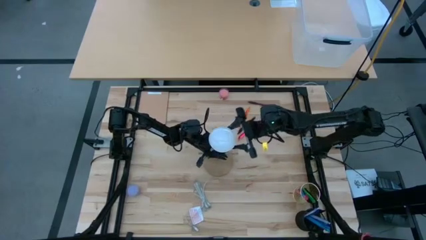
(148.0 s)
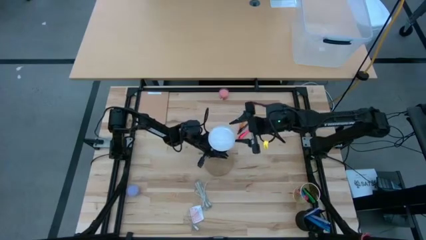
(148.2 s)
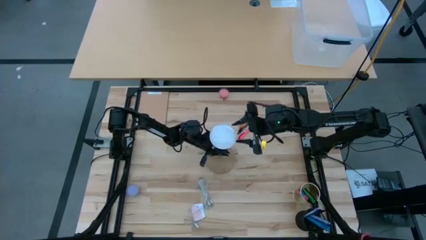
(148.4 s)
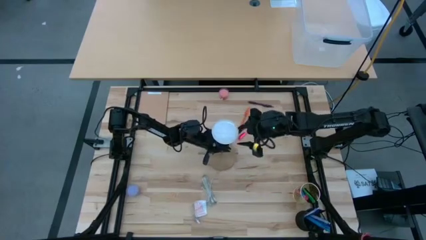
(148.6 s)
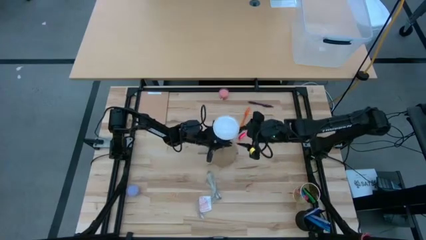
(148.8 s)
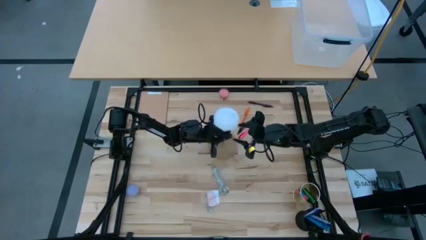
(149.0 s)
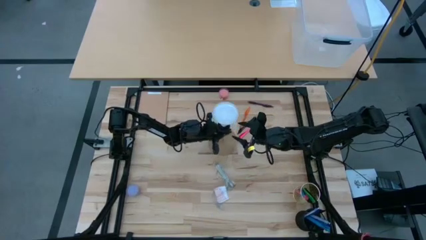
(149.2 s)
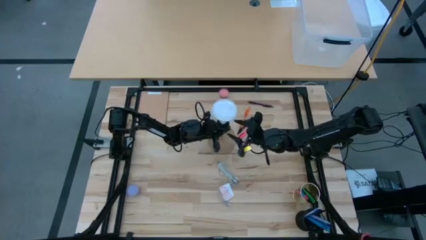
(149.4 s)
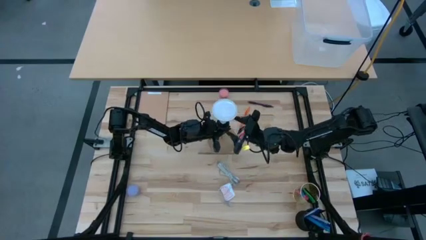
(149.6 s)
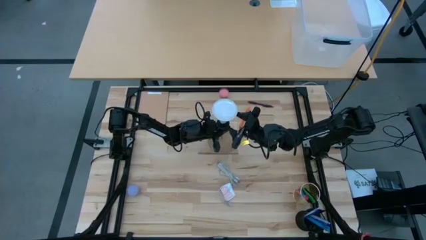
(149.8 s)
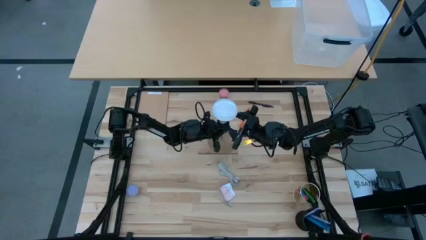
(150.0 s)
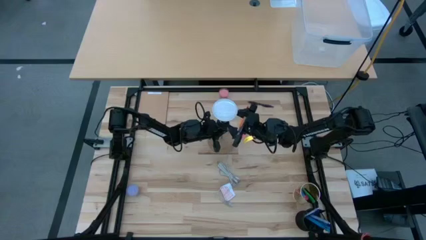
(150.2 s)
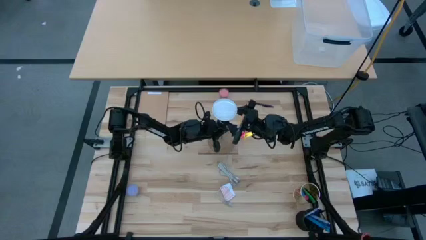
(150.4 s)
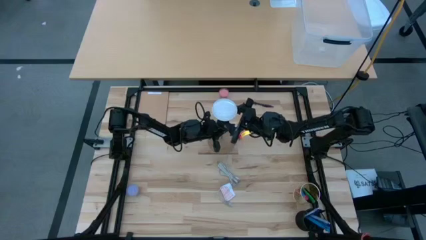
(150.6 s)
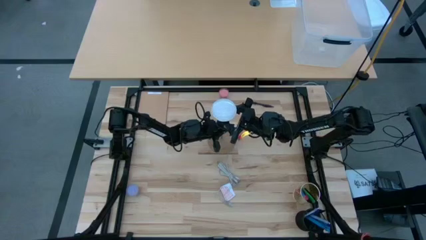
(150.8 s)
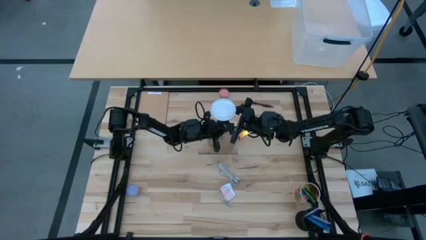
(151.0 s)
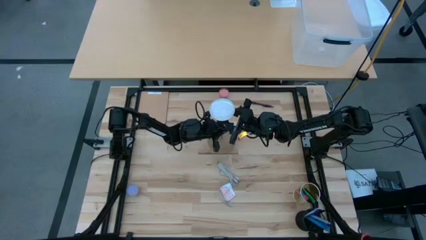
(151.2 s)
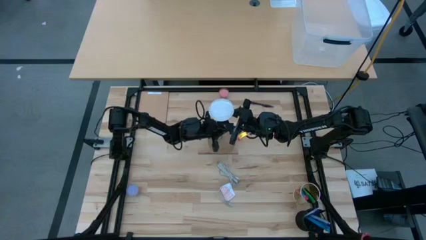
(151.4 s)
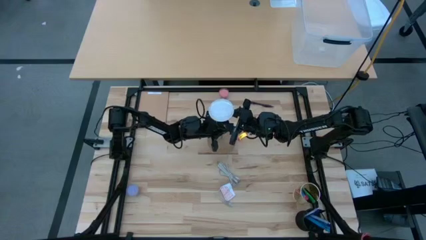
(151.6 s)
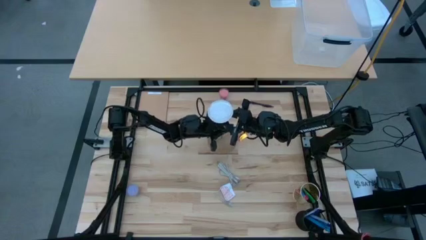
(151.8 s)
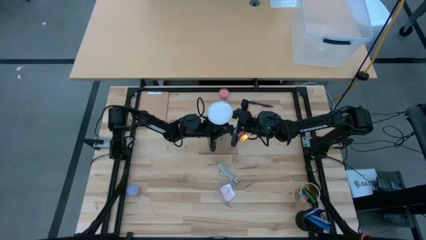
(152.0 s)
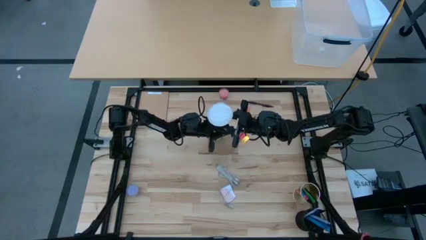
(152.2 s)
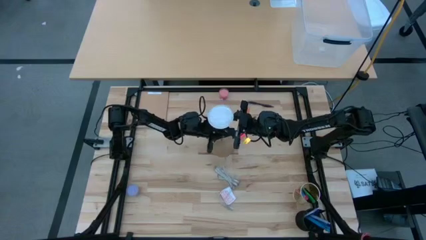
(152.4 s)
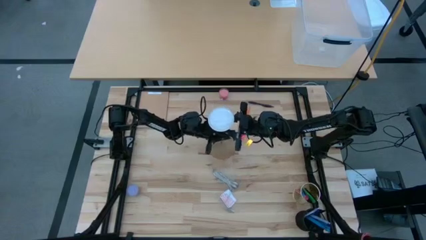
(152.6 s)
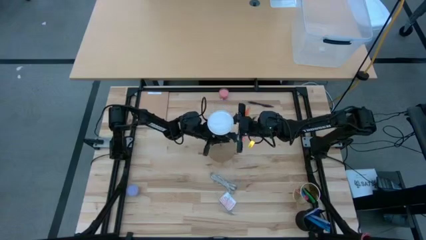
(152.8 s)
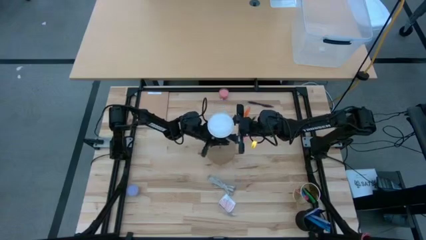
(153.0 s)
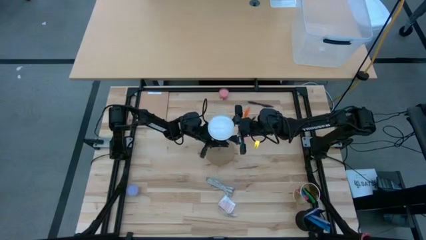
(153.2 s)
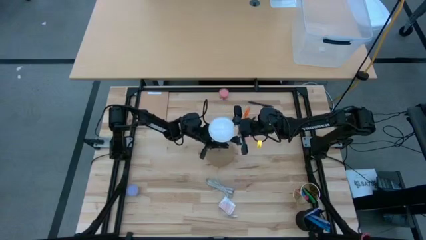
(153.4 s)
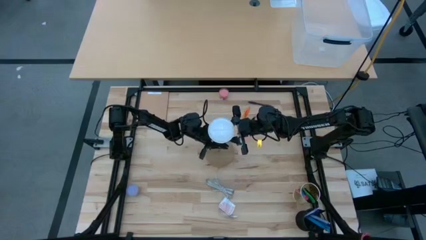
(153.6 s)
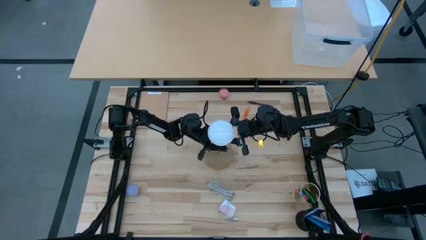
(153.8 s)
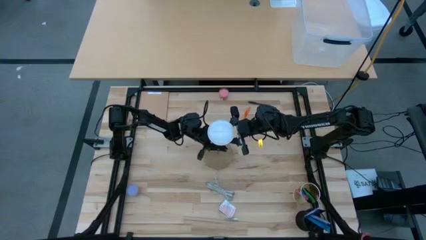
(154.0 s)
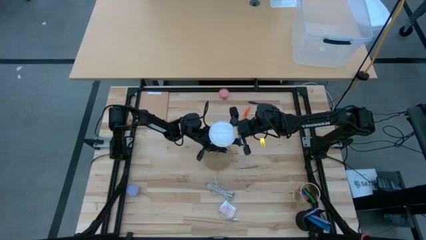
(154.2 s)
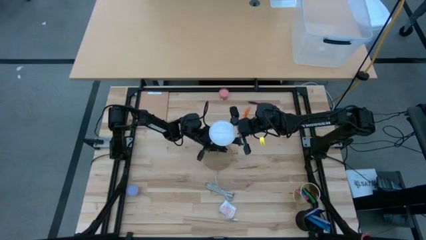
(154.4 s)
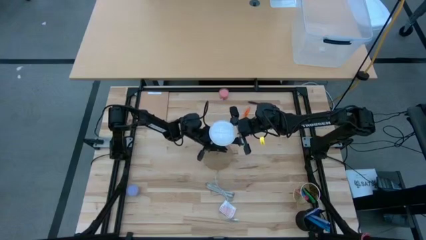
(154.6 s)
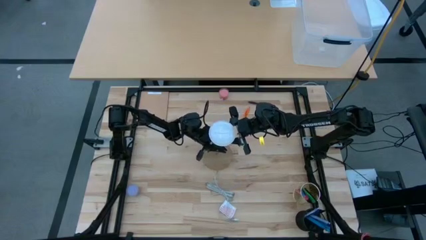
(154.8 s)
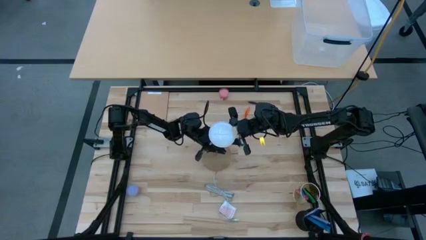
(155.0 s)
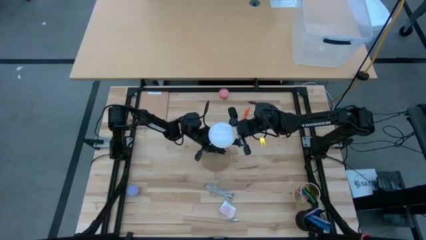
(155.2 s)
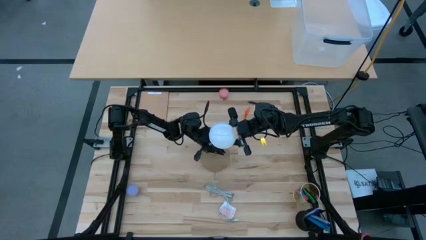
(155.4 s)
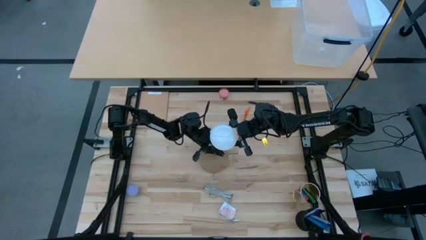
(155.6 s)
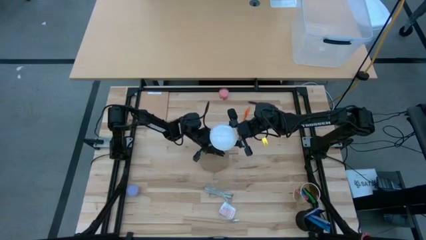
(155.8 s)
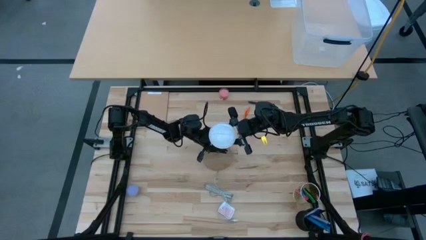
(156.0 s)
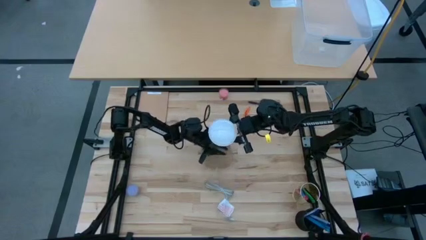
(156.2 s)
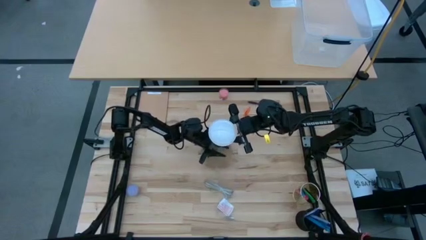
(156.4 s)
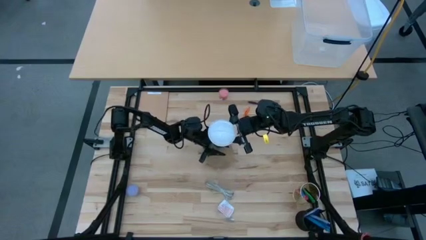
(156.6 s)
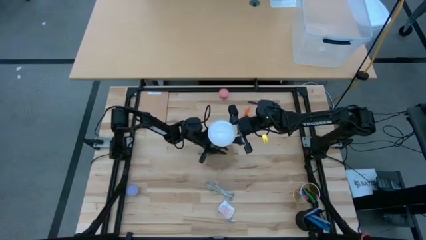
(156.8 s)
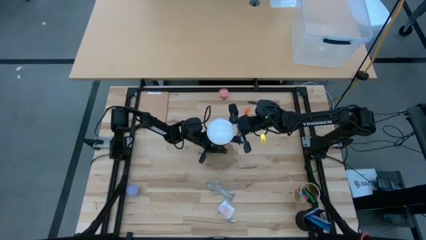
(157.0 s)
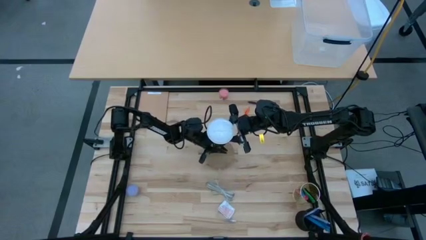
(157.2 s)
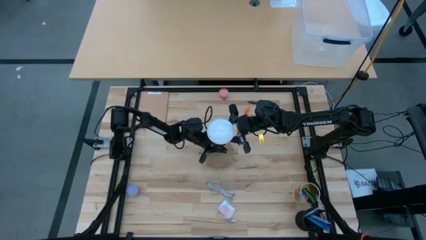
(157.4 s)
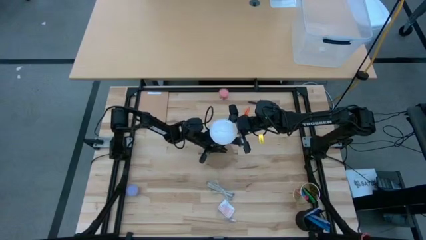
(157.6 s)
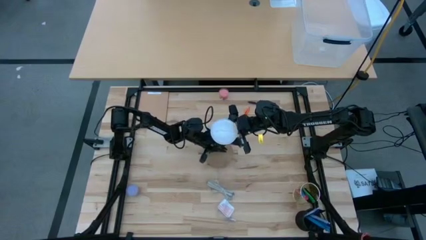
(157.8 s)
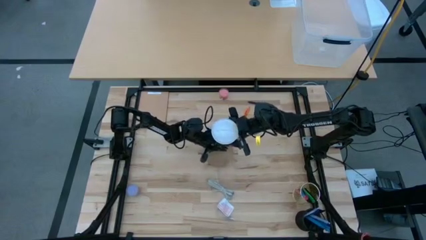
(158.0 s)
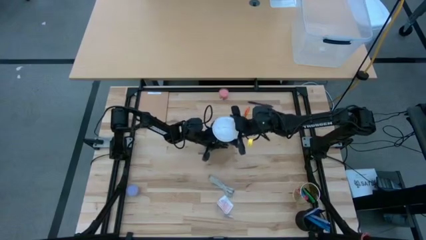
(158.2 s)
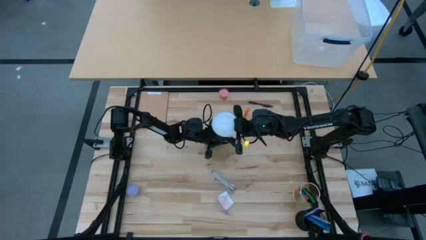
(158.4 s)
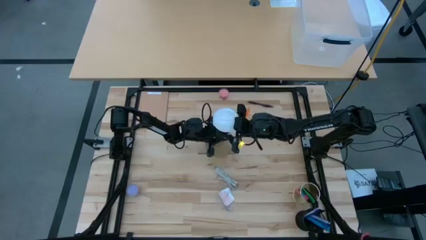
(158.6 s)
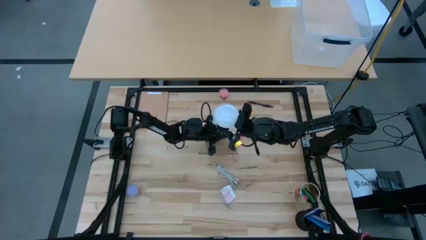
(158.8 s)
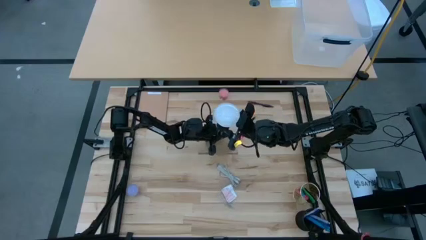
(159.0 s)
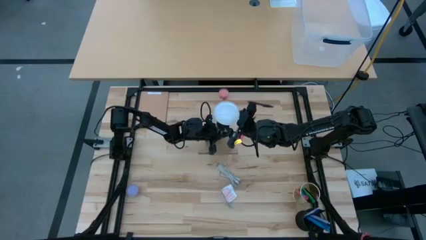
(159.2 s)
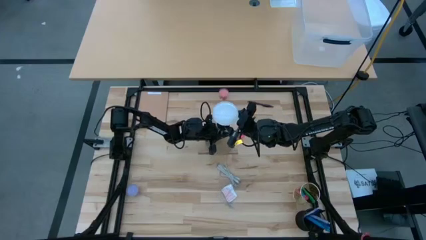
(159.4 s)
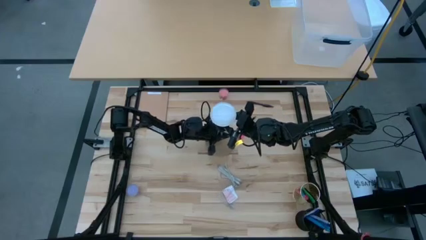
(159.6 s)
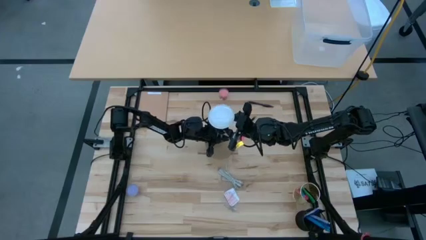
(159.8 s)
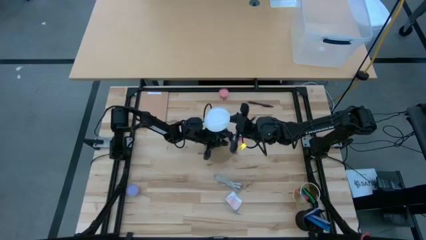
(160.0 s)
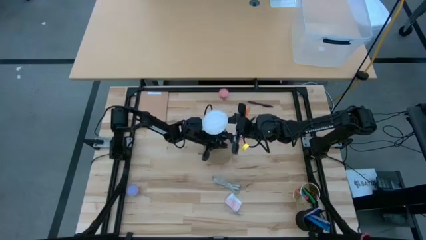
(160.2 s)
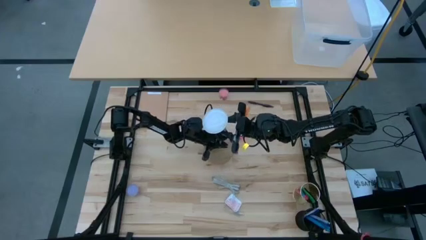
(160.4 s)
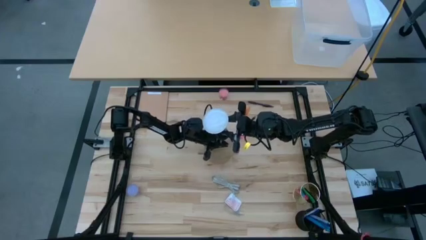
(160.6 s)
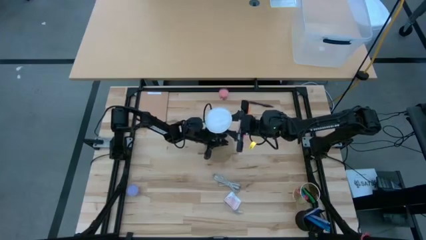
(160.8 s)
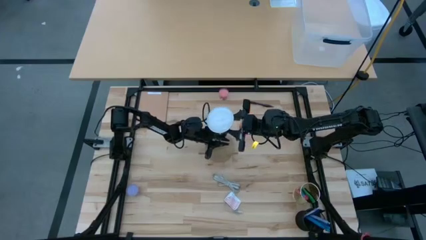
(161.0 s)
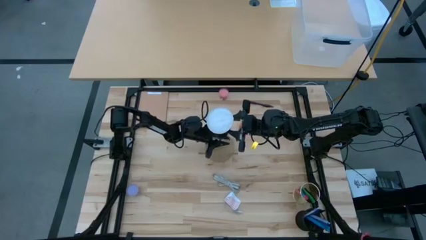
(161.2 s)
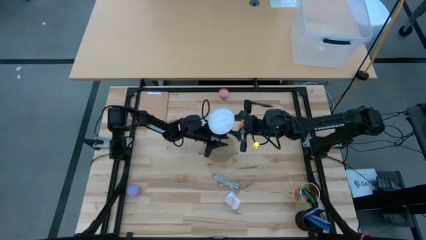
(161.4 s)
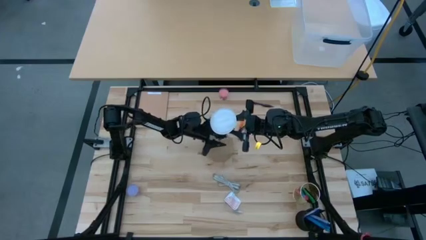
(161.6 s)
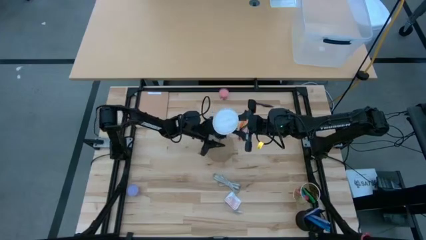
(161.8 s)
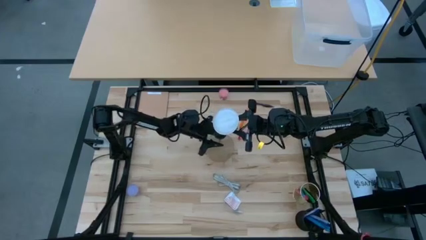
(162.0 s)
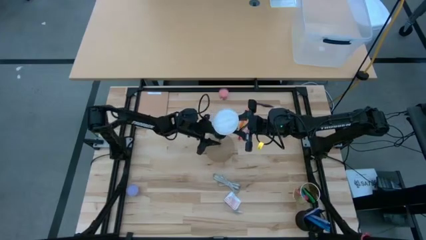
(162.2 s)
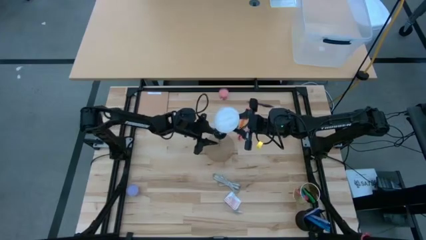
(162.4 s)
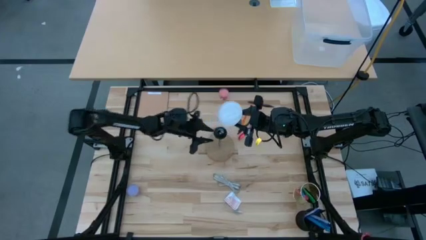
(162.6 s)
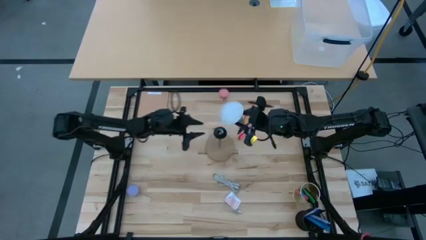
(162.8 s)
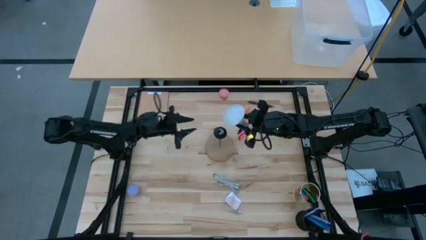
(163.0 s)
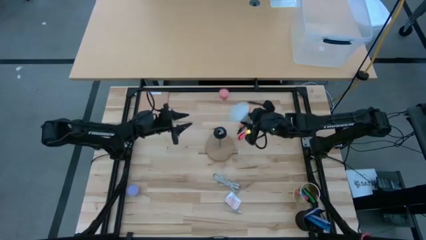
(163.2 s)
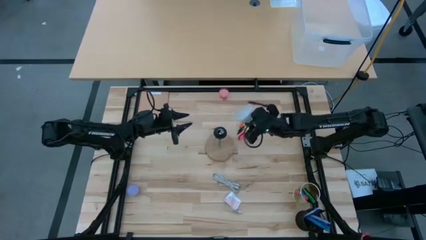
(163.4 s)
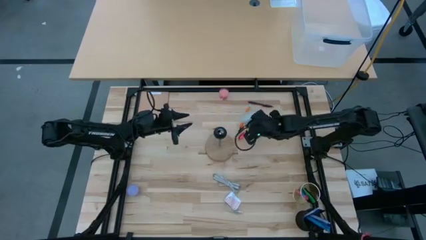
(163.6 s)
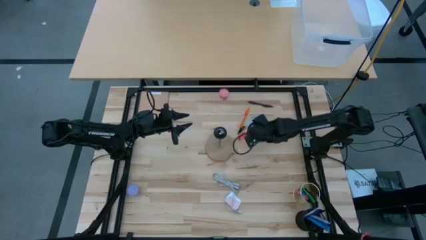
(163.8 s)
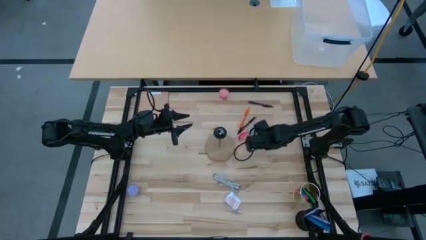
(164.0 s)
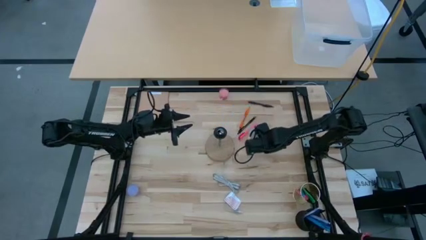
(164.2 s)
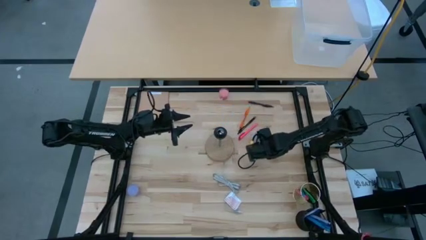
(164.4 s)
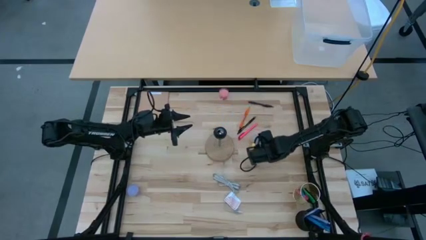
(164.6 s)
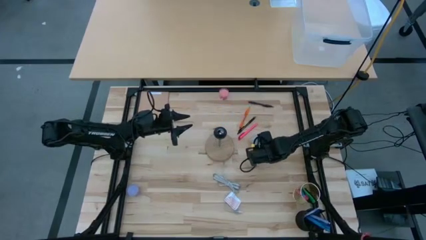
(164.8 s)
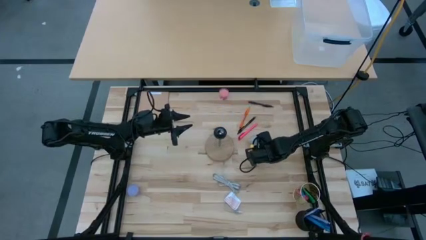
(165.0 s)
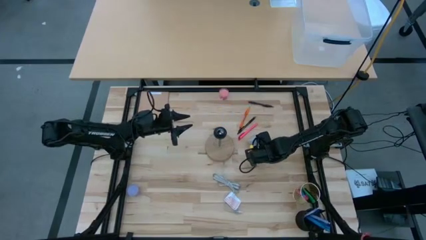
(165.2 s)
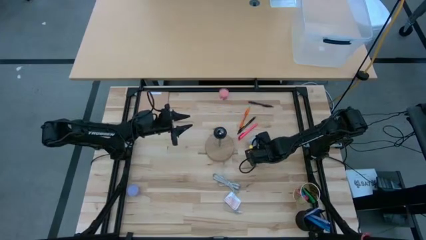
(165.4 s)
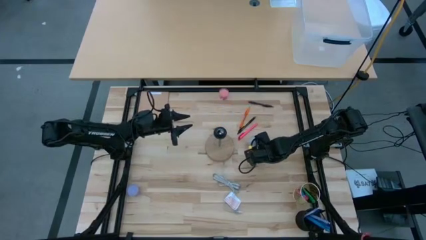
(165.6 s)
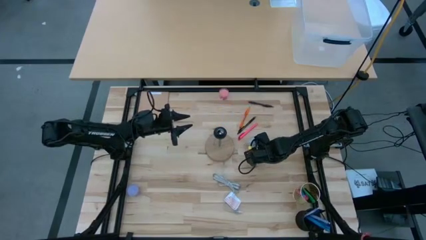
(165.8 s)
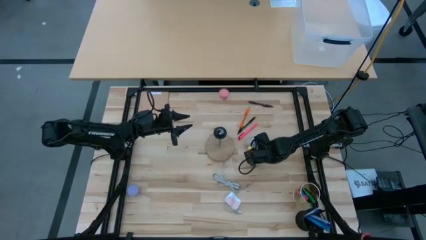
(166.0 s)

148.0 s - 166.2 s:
Task: Screw lightbulb
Remove the white lightbulb from the desk lamp
